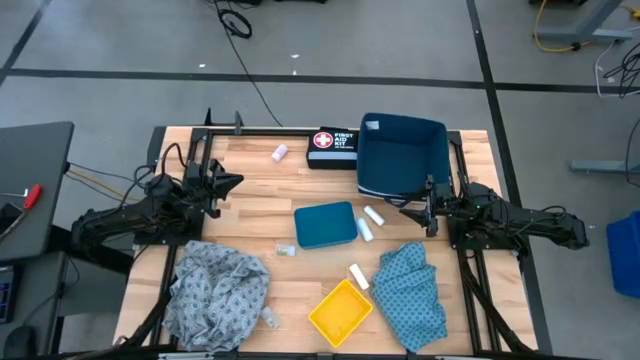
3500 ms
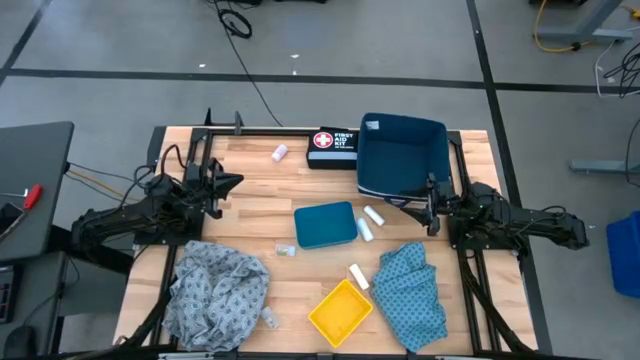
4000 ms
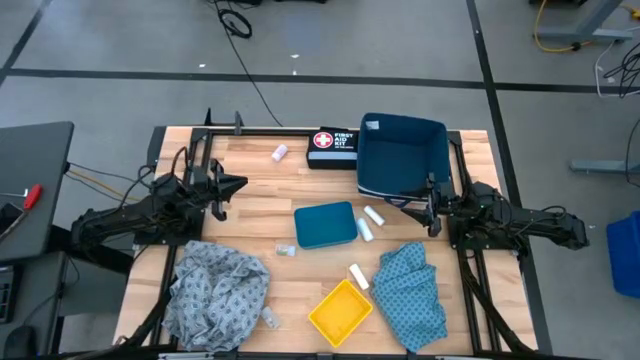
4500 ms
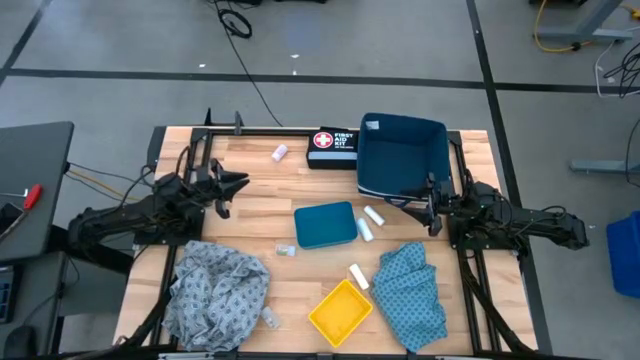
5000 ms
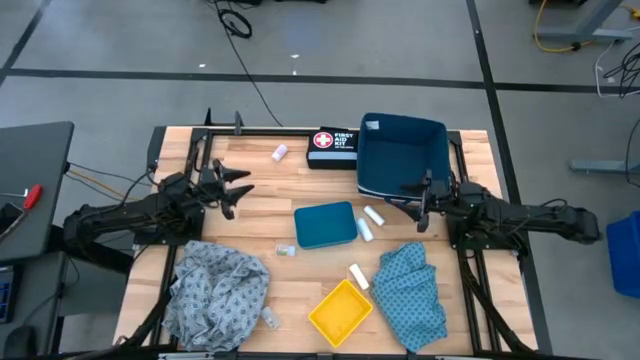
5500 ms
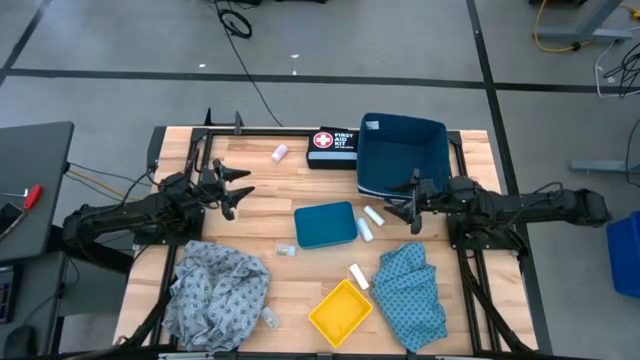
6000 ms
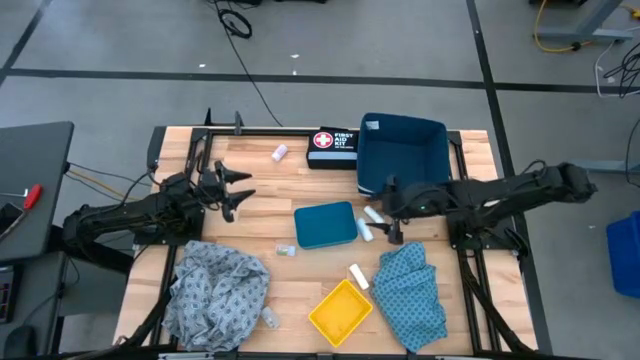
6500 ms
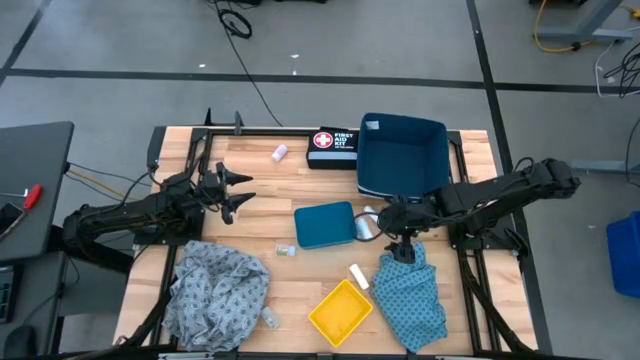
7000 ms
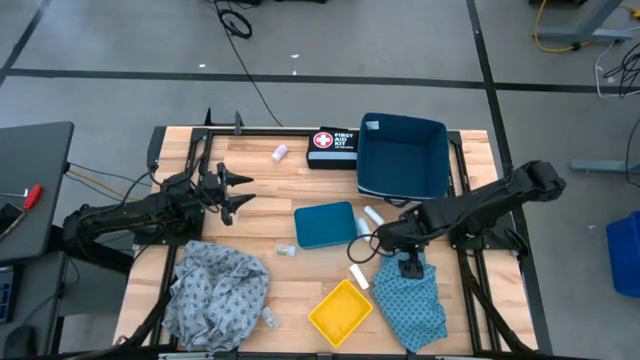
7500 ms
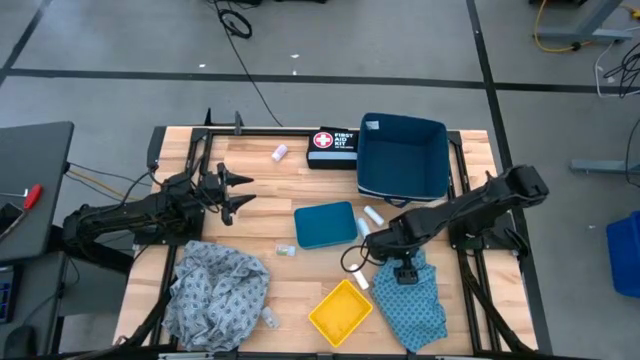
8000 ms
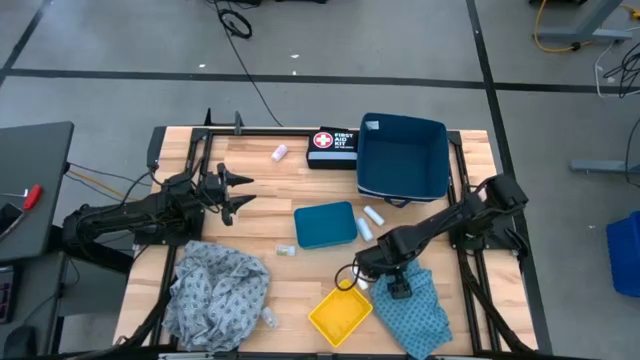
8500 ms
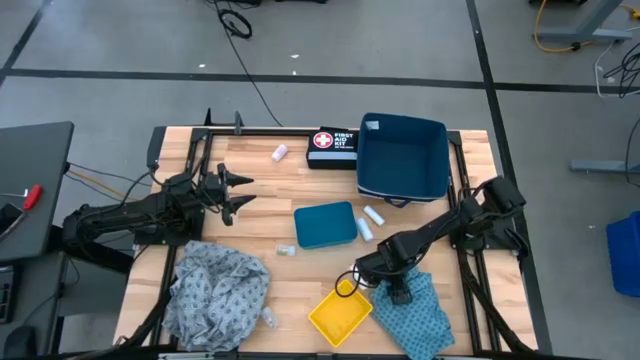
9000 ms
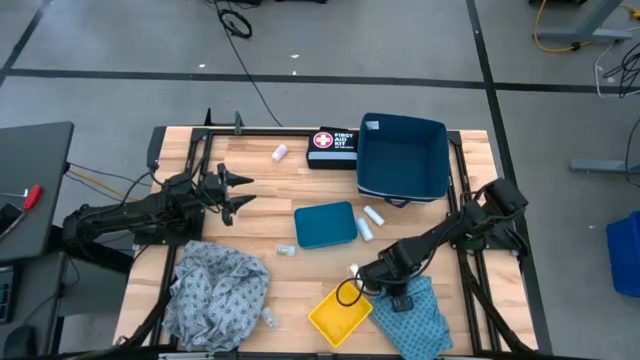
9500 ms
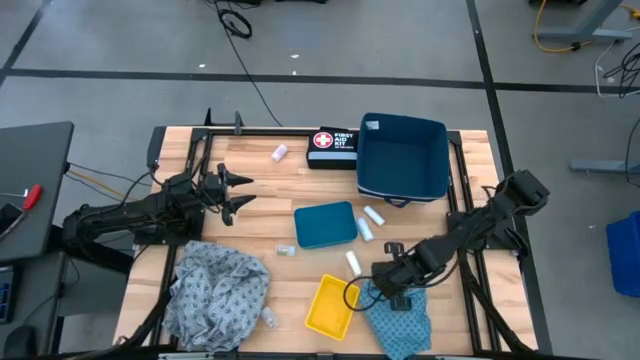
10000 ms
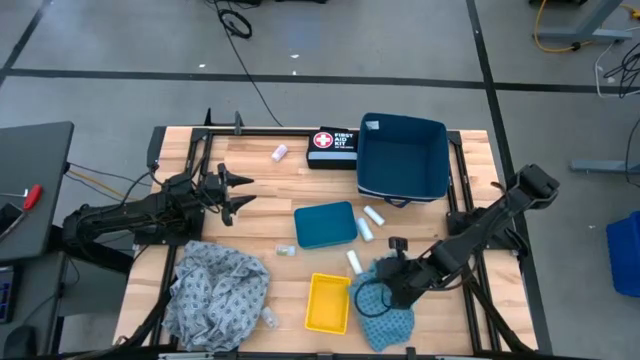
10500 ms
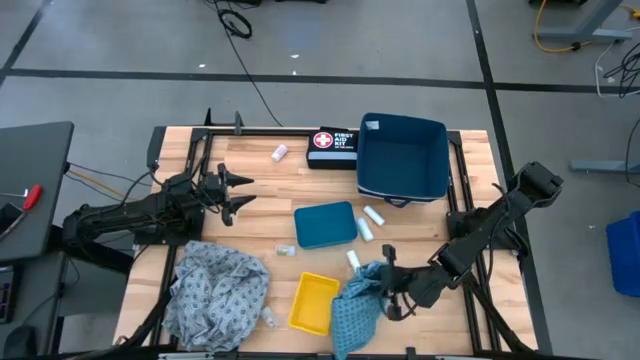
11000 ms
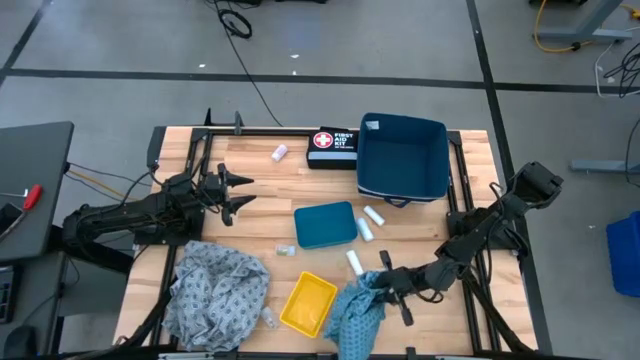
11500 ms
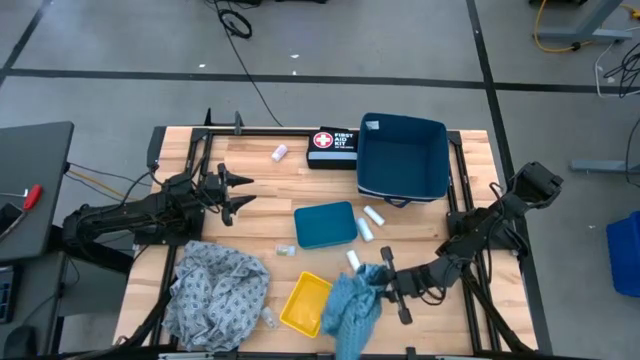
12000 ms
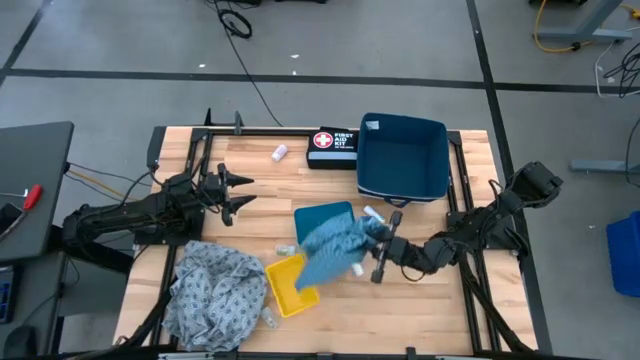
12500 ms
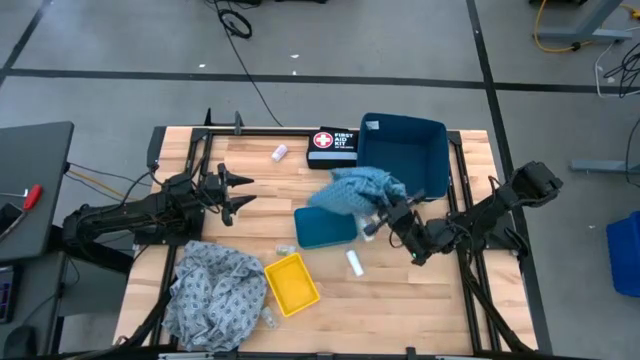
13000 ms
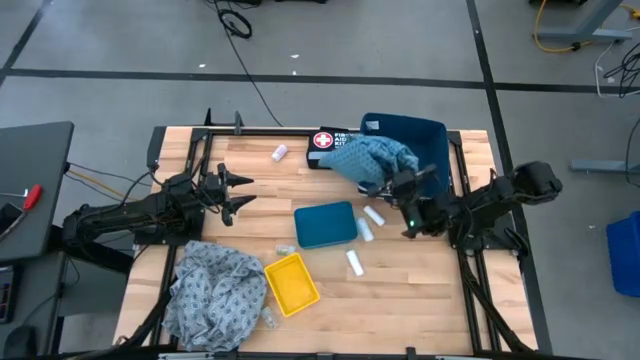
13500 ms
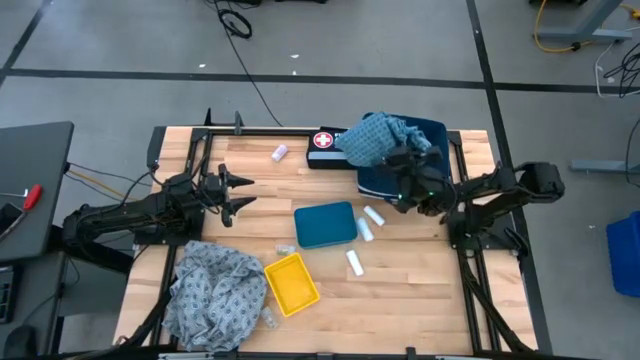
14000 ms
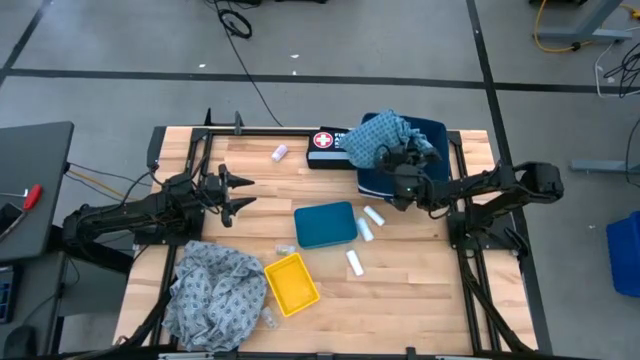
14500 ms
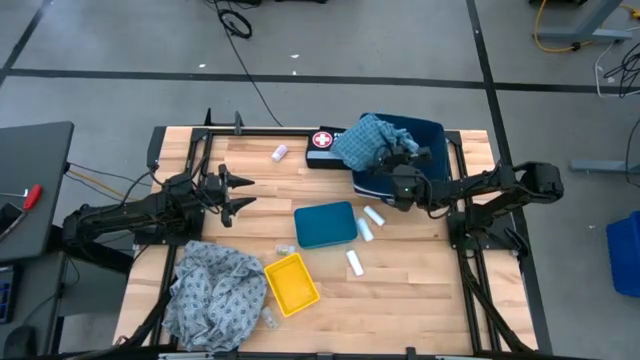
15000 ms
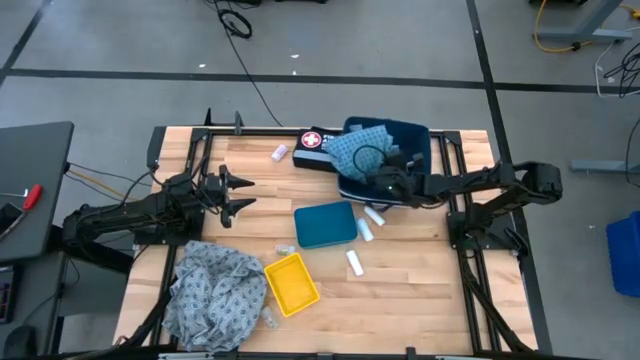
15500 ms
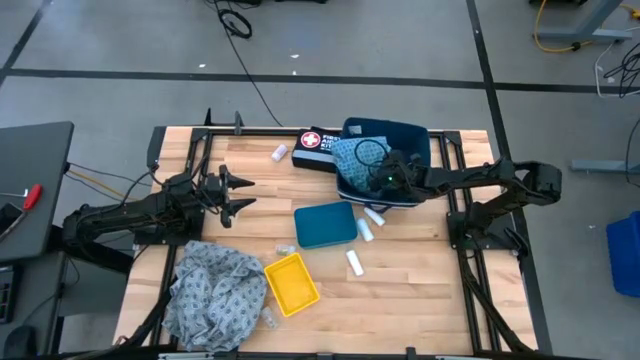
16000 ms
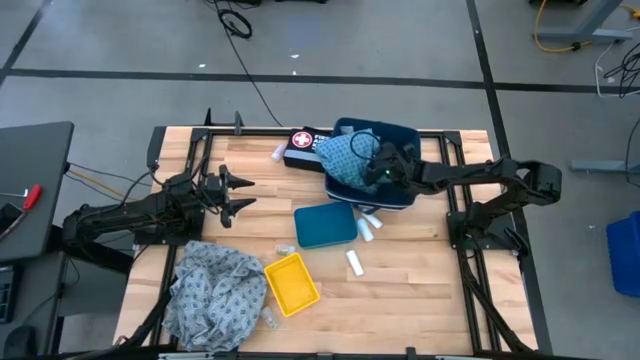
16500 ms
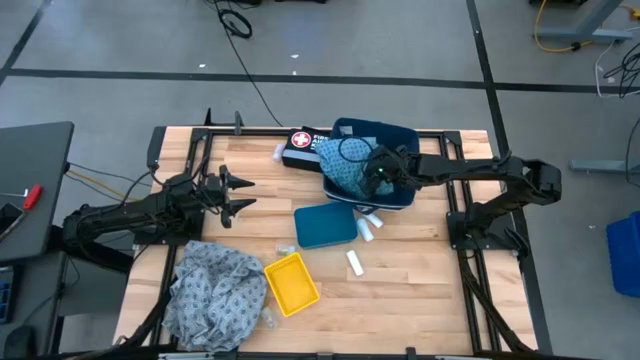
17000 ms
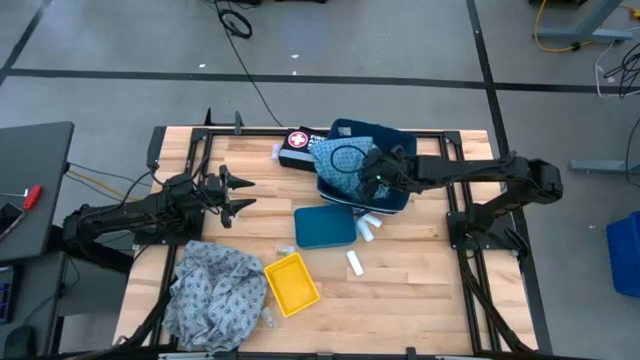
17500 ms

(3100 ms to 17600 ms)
Task: Pick & place medical supplies in basket/bin
Put the blue patient gown into the white and blue bin

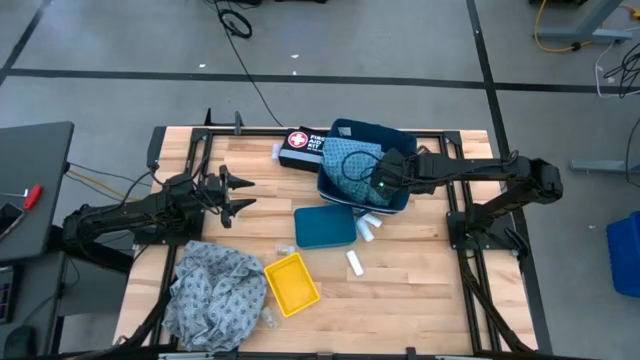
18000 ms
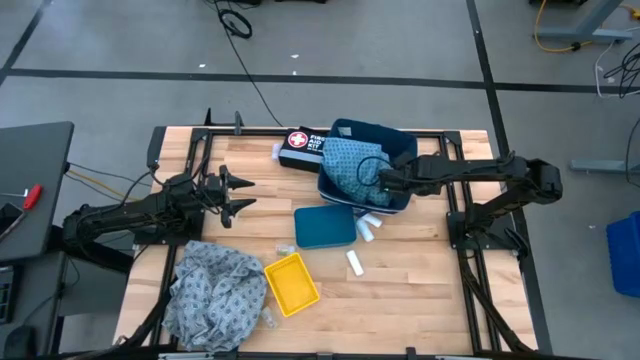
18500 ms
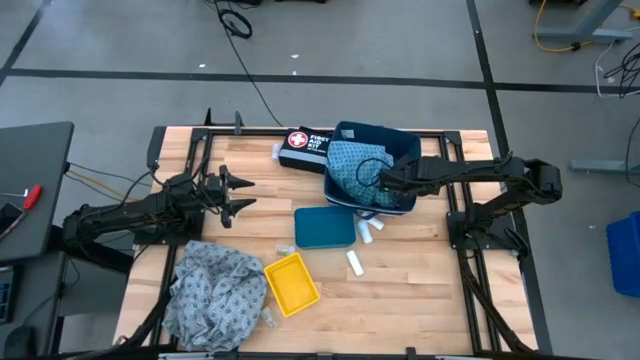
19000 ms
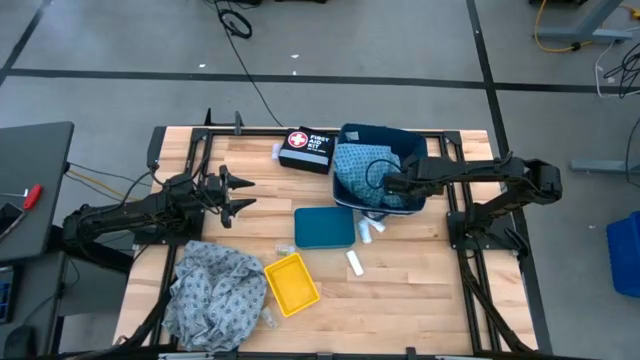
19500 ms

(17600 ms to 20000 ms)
Adjust the large white and blue bin

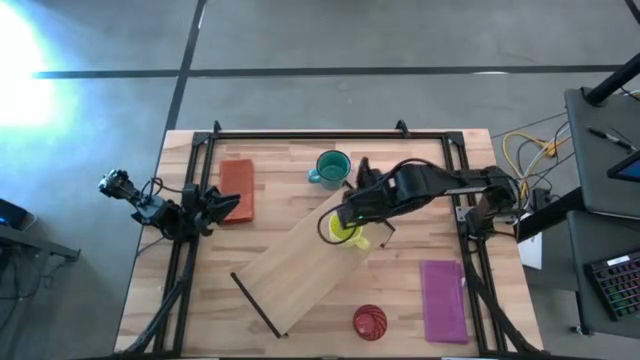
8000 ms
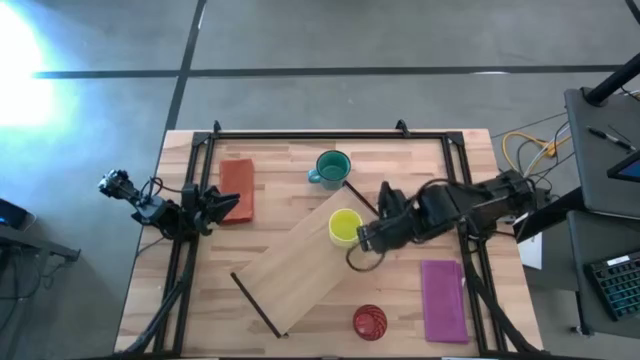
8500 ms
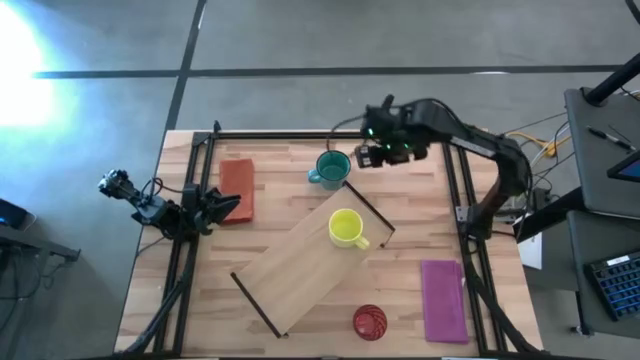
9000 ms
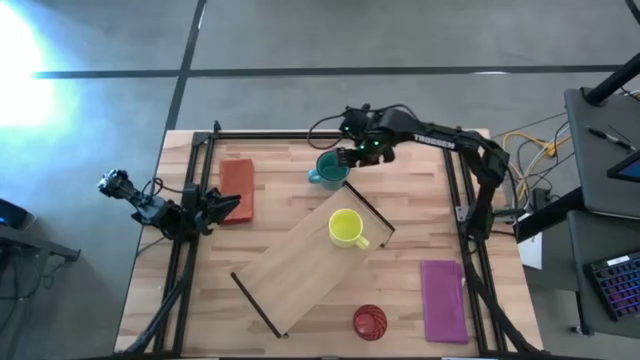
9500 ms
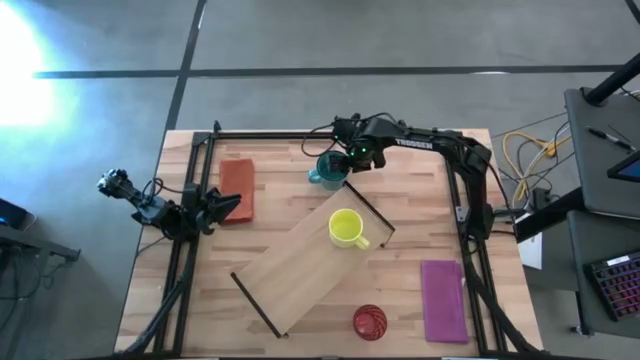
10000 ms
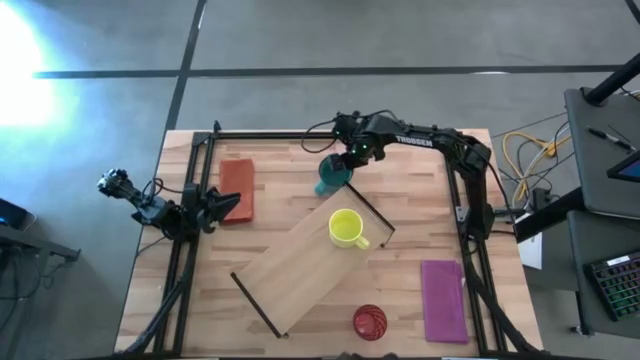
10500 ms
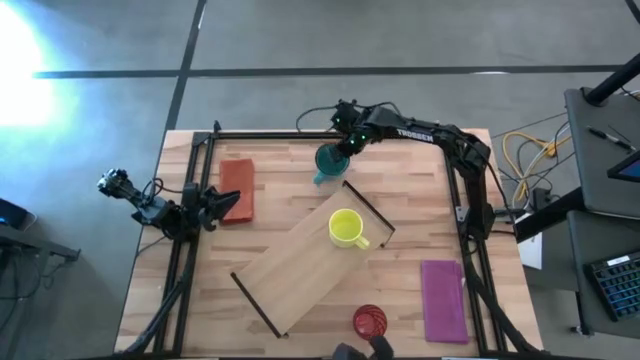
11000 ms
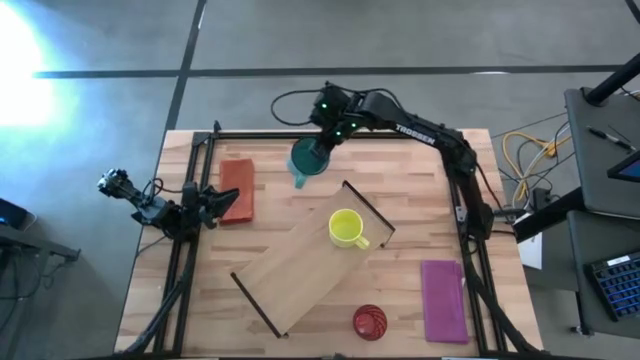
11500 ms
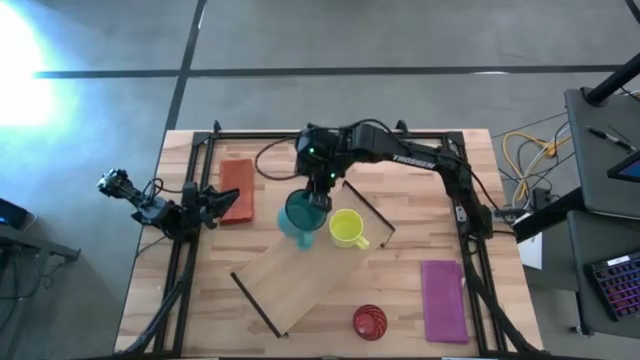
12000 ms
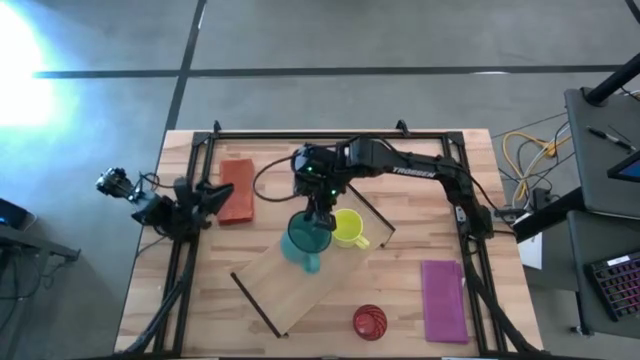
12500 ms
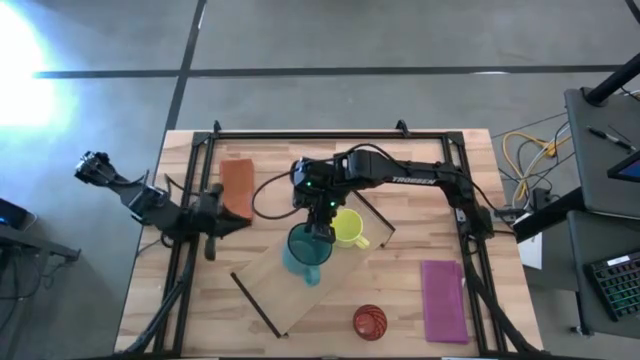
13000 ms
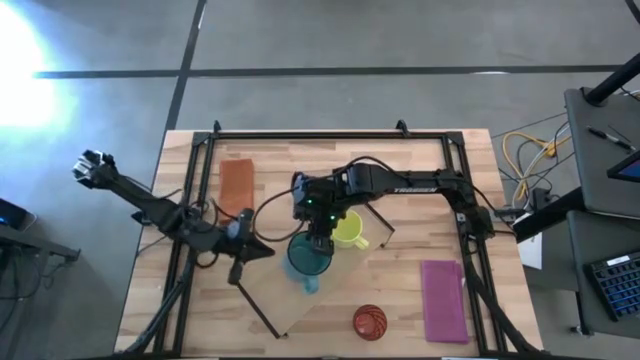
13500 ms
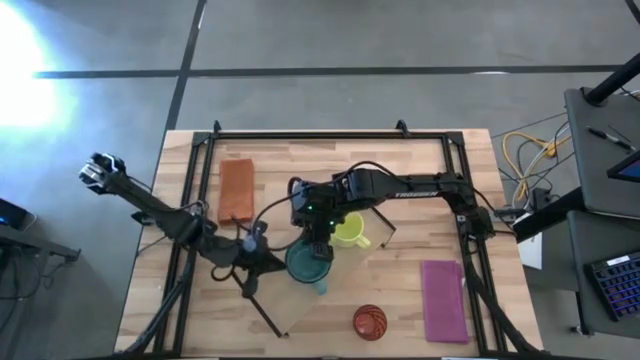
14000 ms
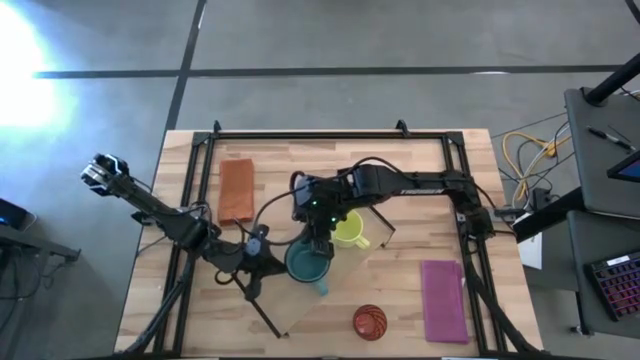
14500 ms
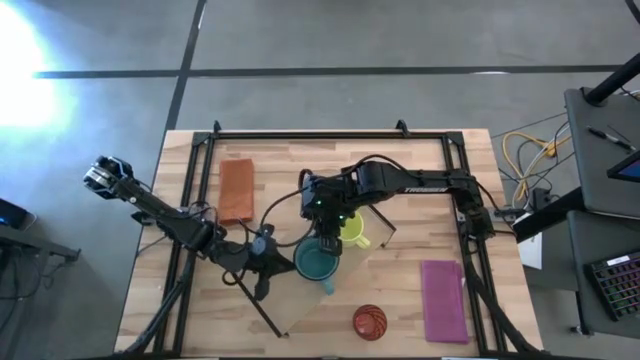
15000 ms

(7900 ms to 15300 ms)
Task: Stack small to large cups/mugs on shelf
Put the blue mug on the shelf
